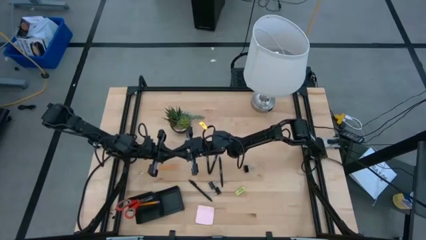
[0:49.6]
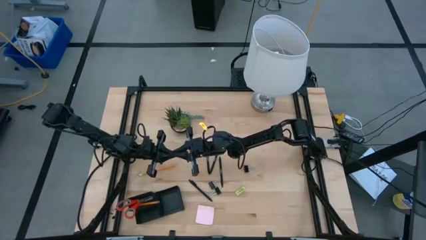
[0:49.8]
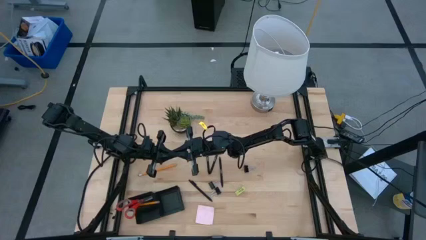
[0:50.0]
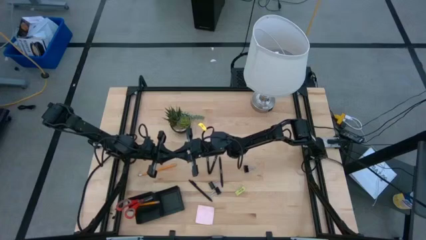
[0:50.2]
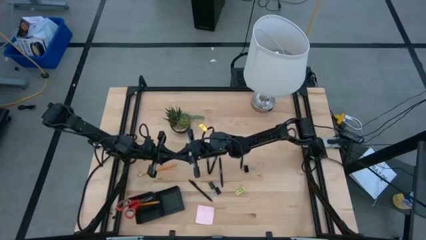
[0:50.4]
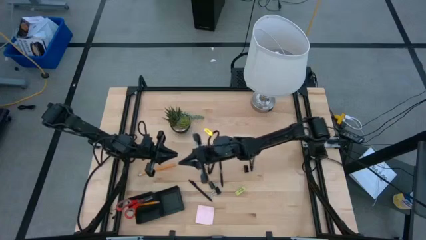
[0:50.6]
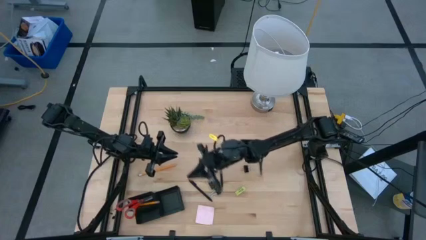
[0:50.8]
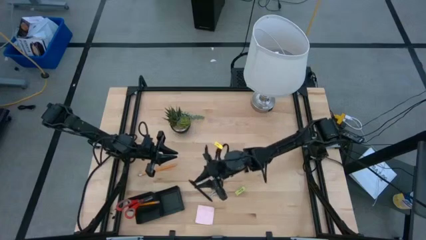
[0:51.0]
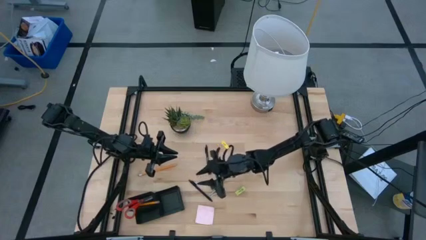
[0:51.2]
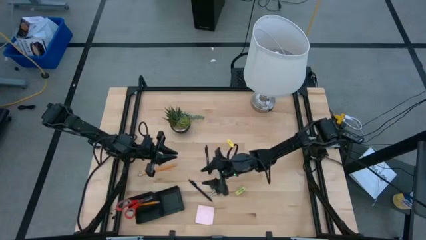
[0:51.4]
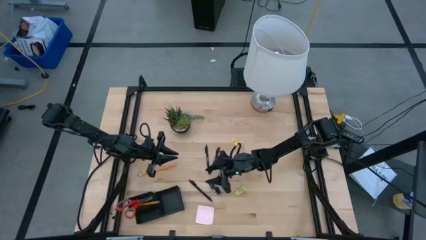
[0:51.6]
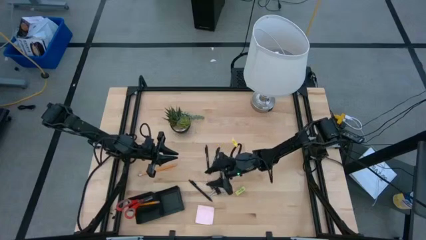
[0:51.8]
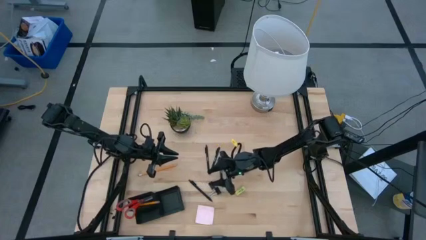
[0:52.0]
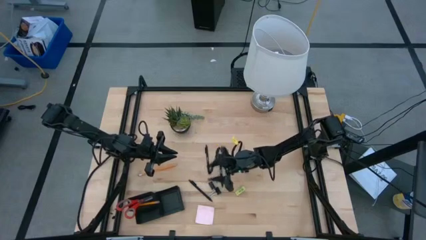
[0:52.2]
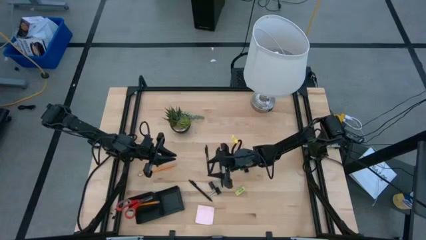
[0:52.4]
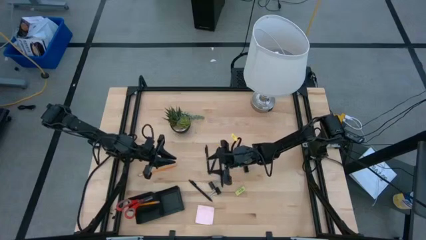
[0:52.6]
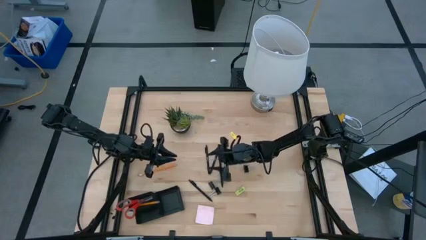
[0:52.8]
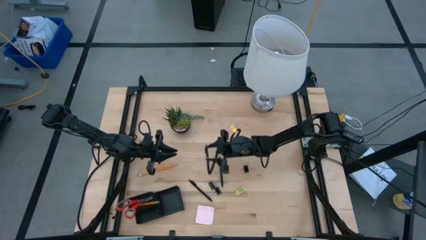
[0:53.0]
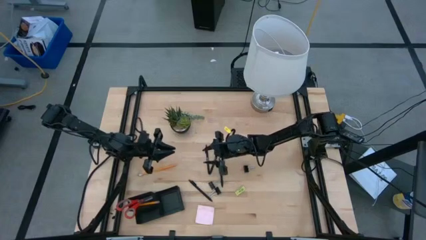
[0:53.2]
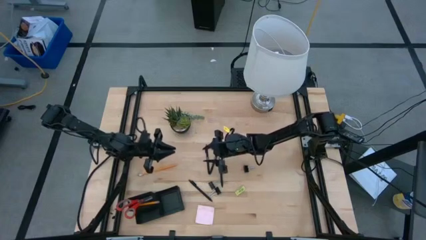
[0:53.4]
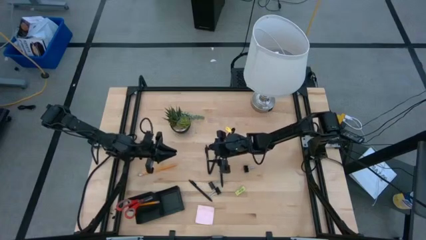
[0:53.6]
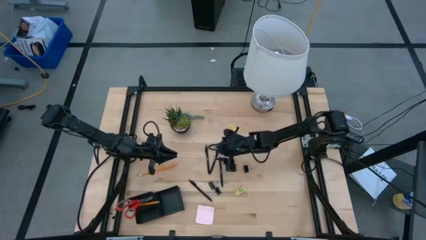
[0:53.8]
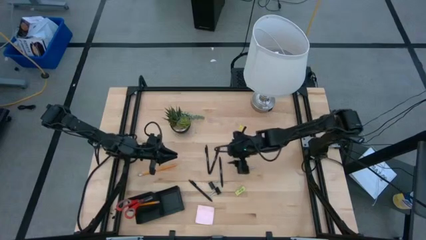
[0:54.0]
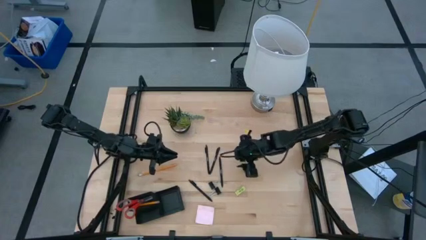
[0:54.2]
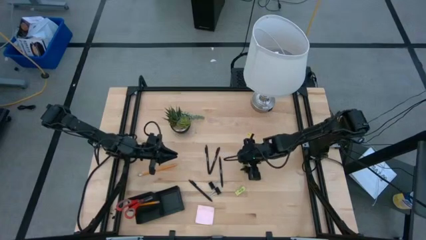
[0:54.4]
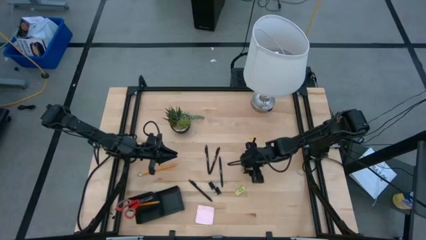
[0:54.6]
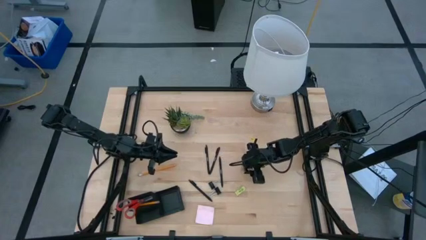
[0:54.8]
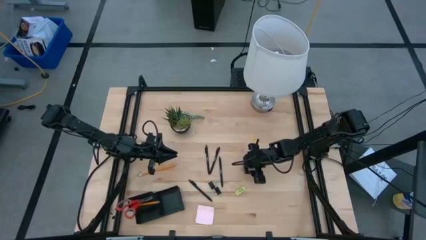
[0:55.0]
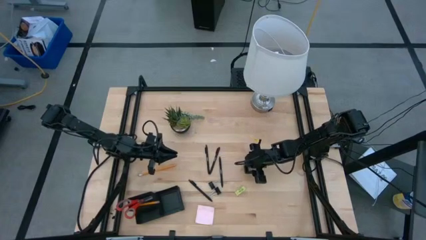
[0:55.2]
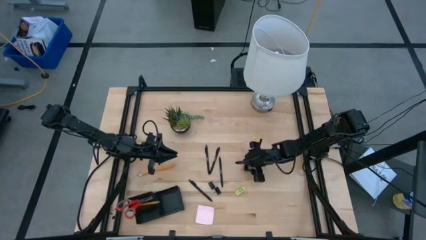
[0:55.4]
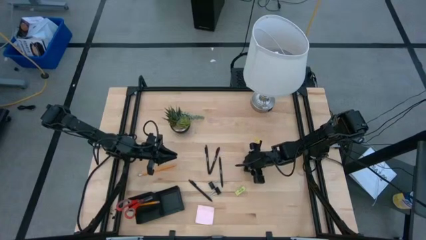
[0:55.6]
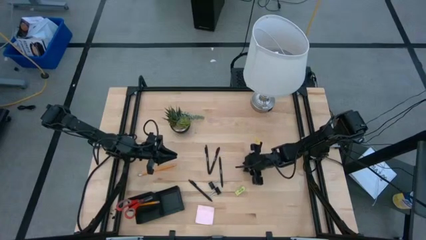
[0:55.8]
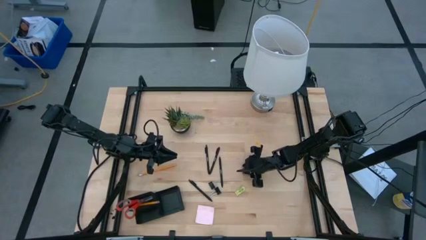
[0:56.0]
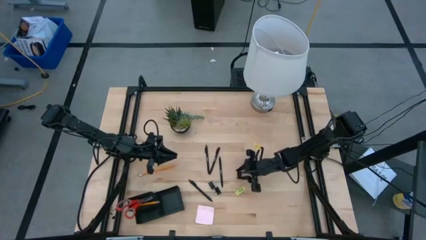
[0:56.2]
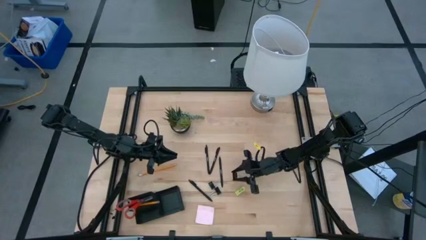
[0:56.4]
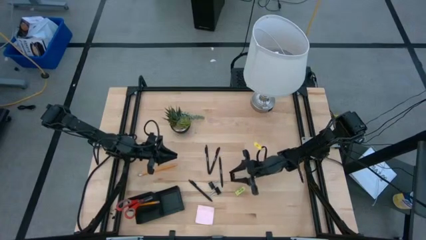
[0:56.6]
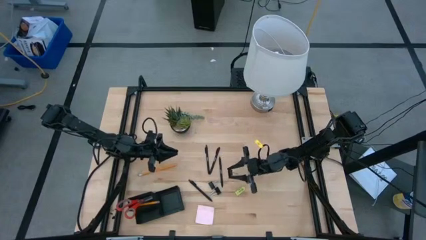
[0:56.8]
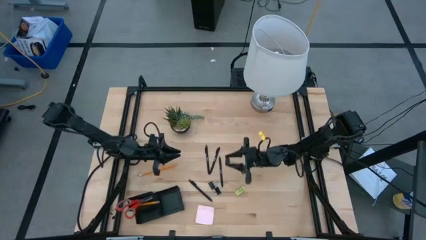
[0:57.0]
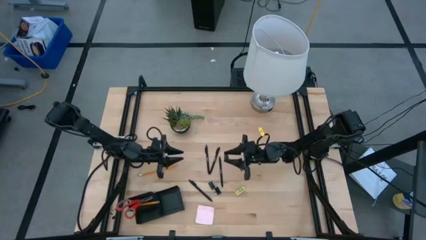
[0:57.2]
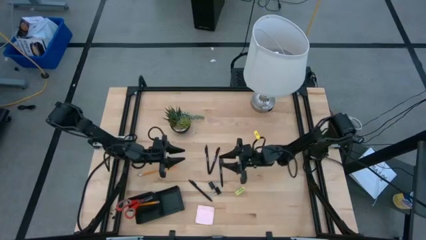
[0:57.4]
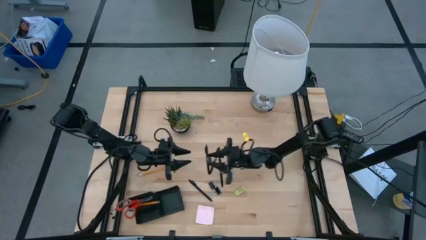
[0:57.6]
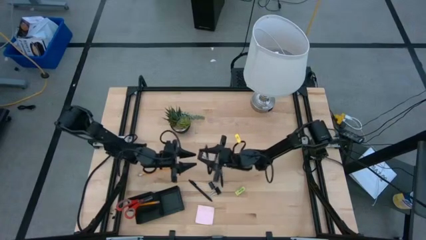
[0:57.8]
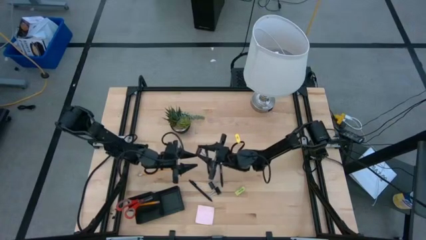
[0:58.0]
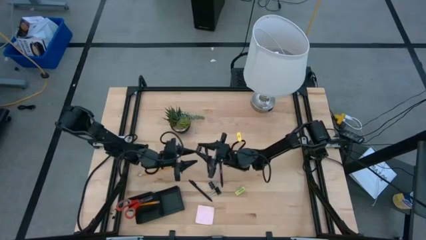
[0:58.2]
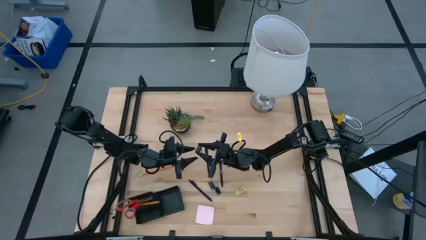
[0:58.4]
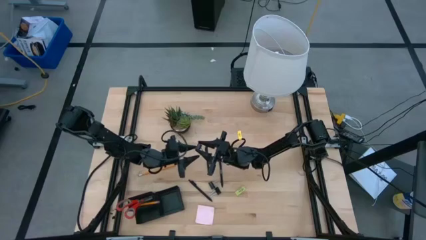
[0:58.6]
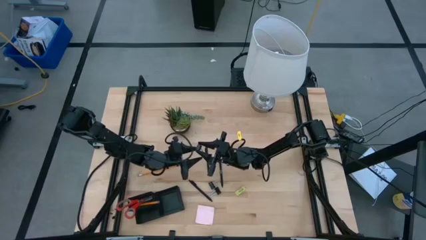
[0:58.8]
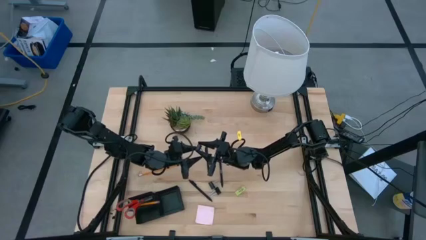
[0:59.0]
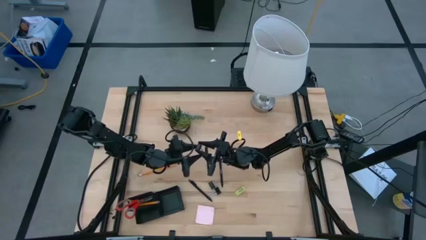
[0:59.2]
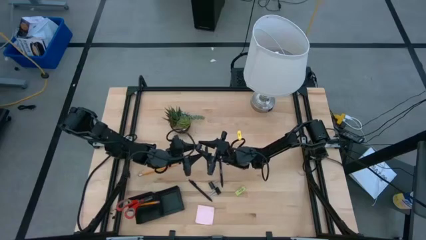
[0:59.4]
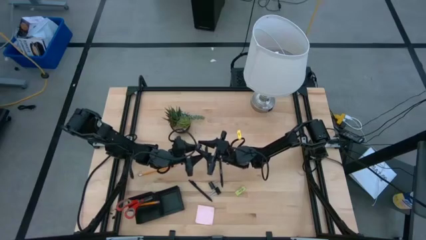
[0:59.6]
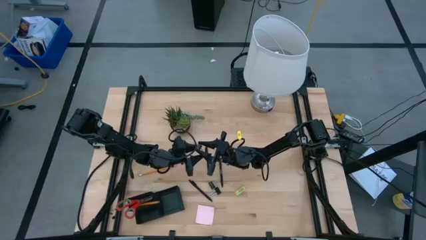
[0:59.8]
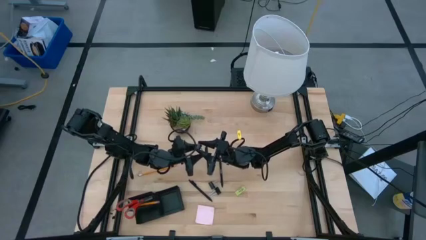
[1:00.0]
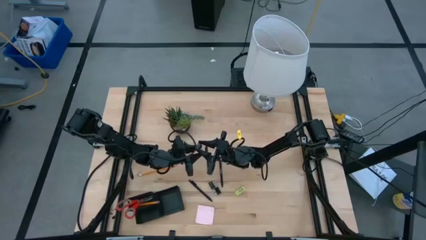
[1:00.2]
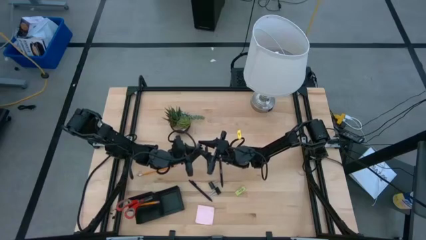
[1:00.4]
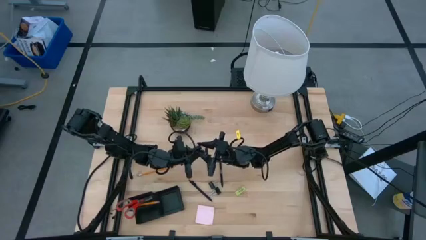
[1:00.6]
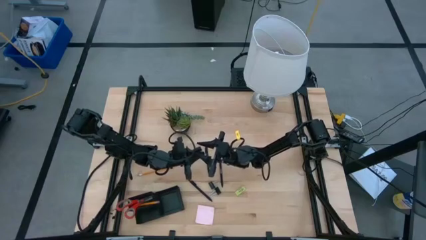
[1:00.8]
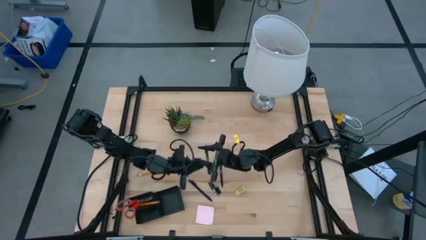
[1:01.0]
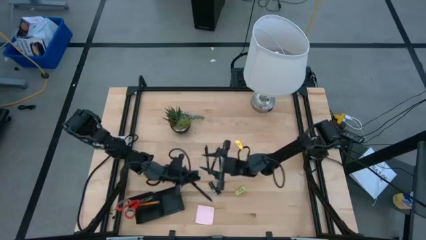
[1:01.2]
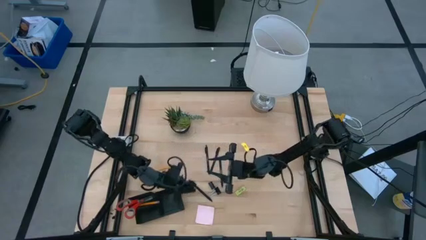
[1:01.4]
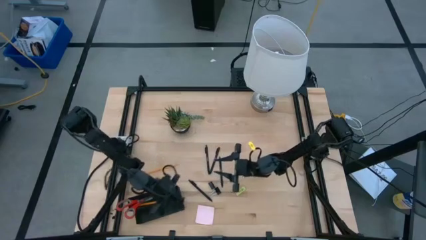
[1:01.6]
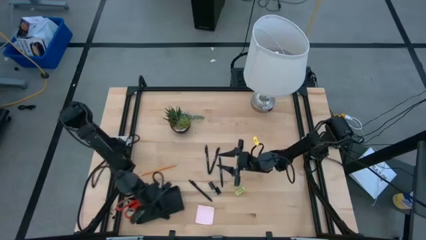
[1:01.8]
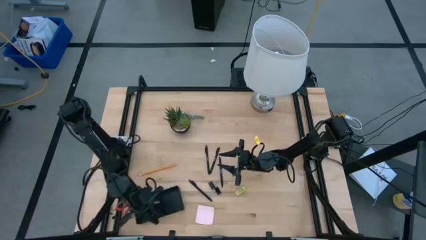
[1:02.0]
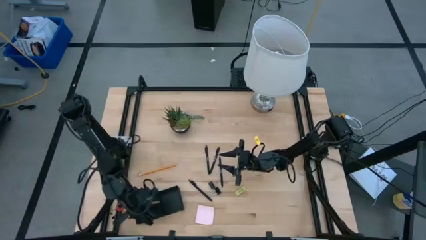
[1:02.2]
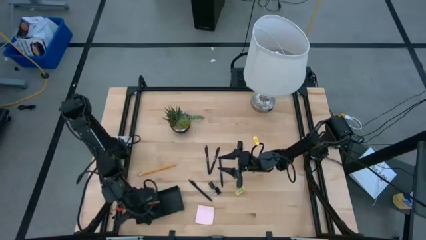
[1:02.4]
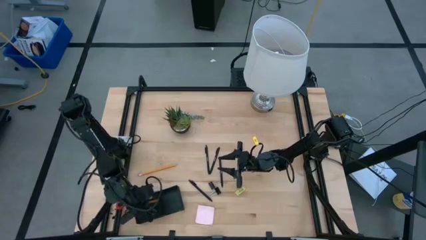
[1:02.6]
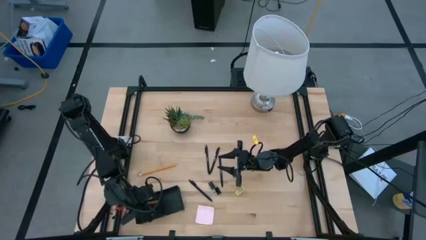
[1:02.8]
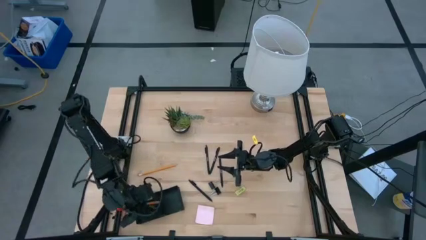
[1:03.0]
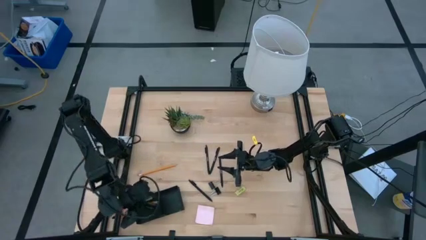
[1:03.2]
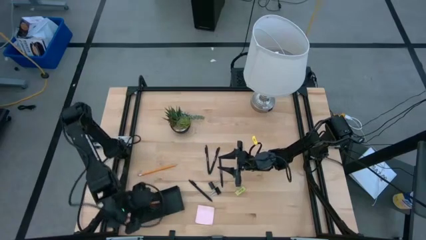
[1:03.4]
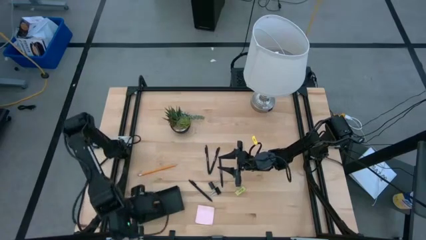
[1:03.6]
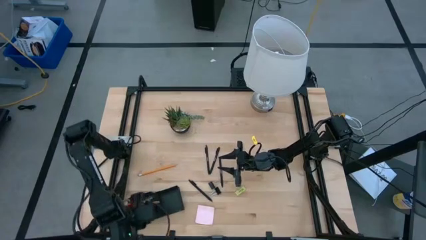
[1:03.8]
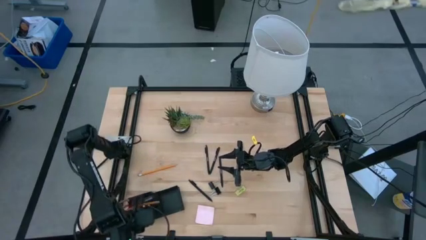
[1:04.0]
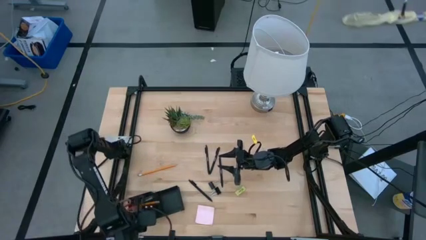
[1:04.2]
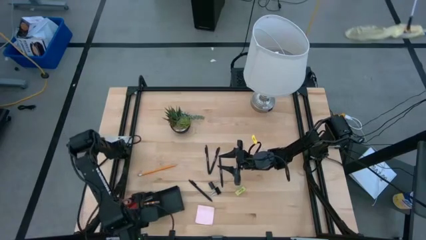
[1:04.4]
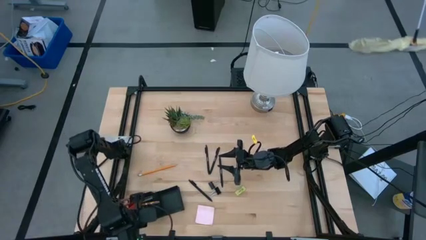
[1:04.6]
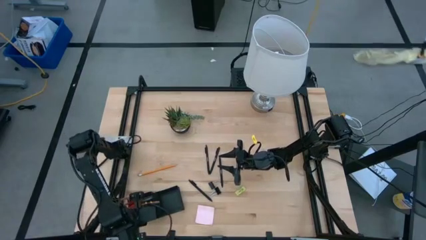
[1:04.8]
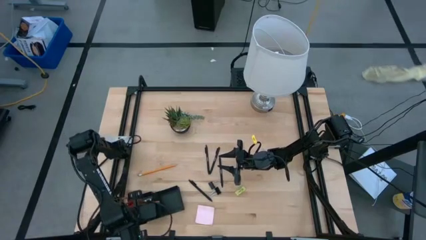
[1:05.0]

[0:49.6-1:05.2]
Task: Pick and place office supplies into organizer
Put the top binder clip into the bottom left section of the desk organizer

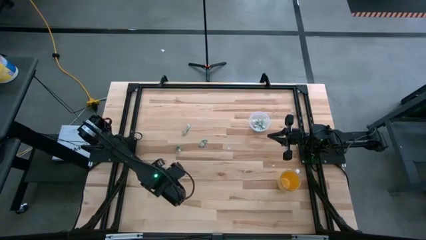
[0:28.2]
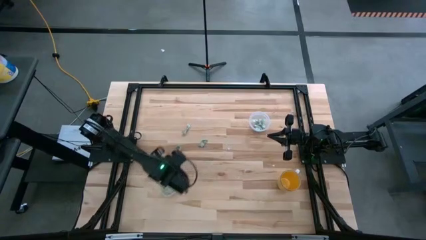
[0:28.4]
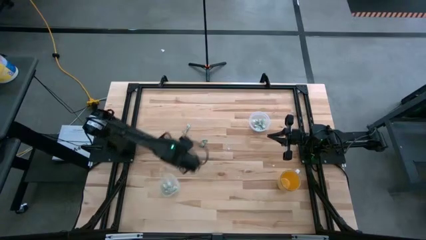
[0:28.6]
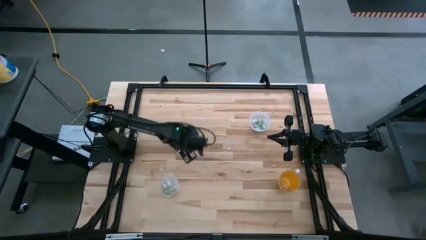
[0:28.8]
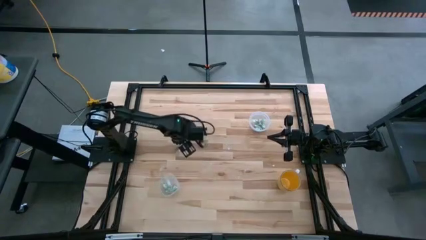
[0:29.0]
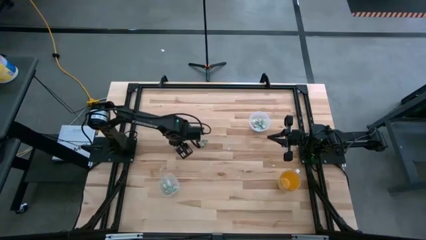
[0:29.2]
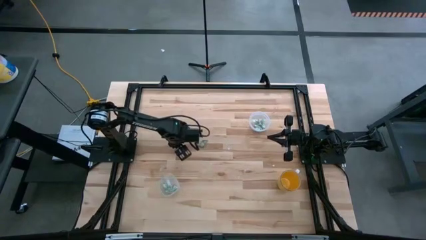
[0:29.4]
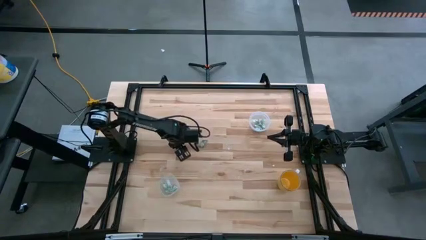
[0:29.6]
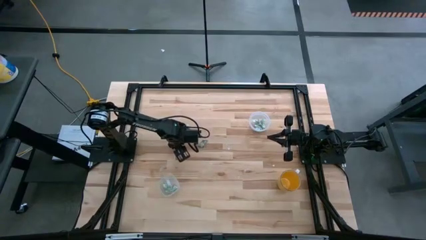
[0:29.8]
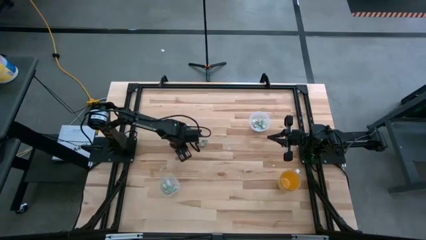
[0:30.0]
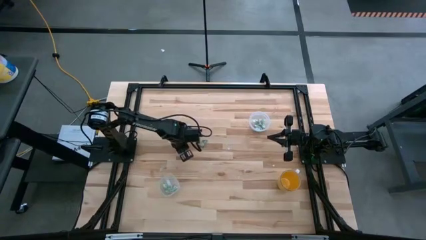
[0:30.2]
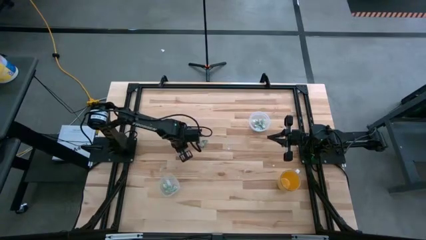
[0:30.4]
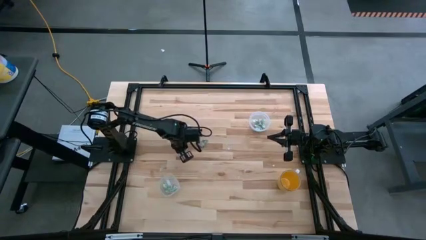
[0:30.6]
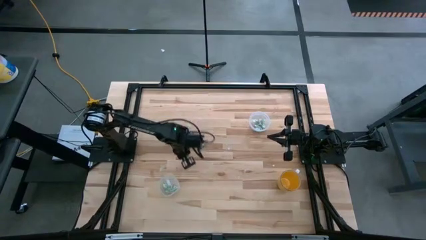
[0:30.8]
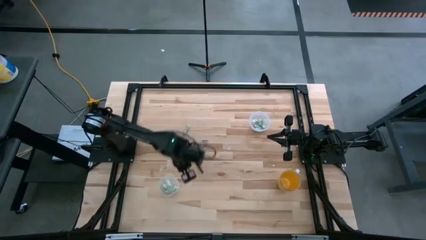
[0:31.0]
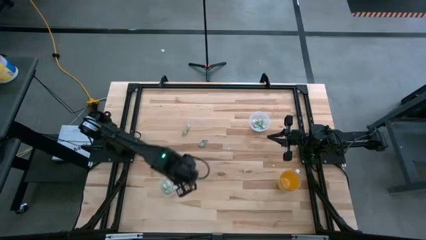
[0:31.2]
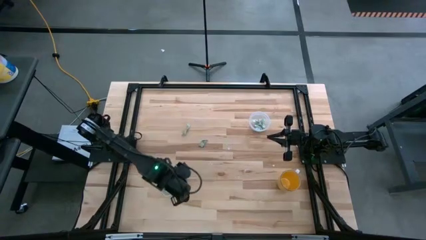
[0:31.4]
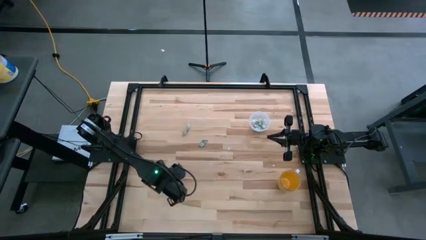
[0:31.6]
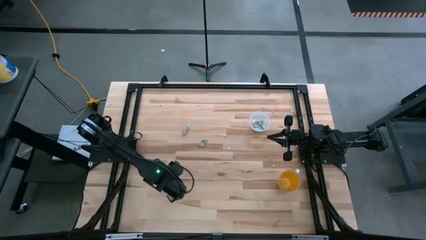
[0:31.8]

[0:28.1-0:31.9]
Task: Pick and place Stevia / Truvia into bins
Put the stevia packet into the oval transparent container
